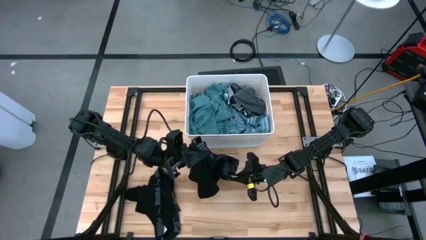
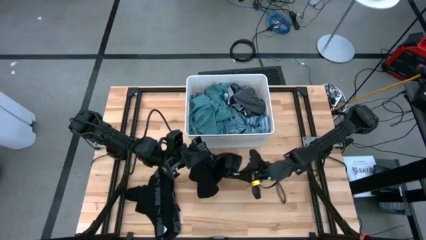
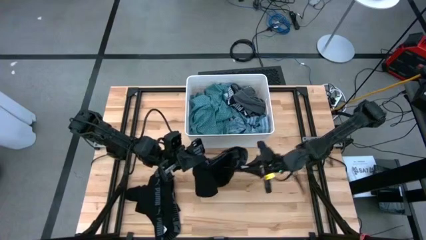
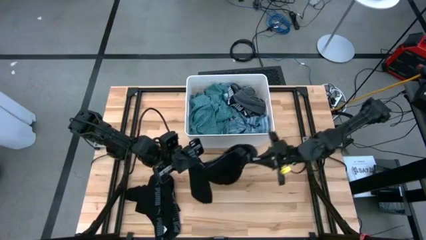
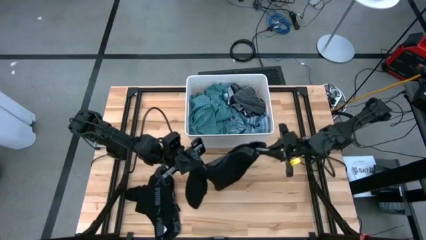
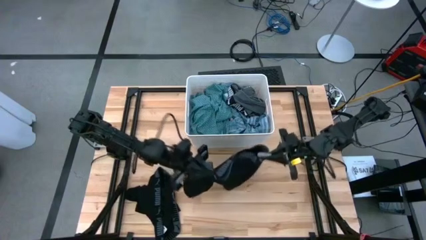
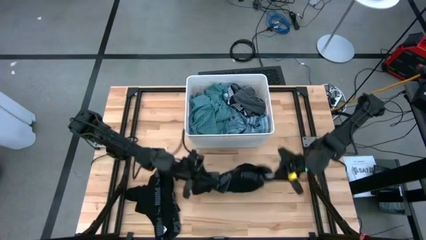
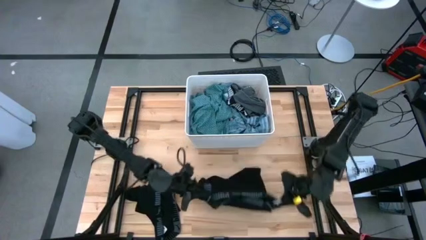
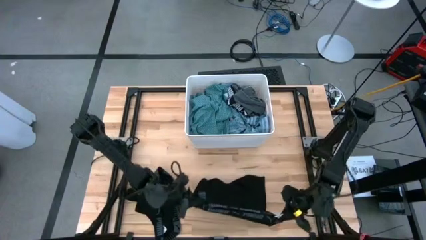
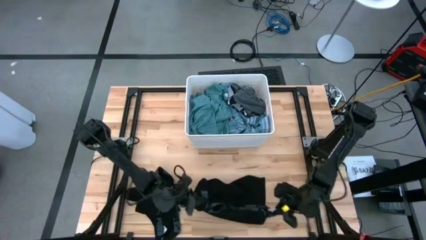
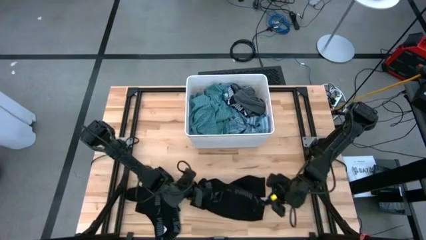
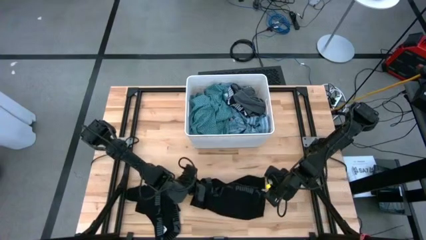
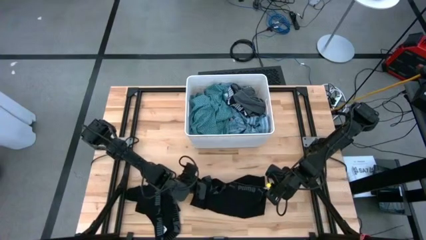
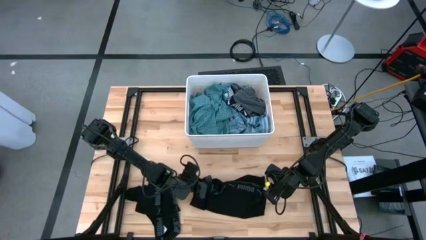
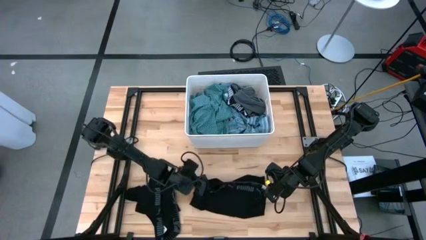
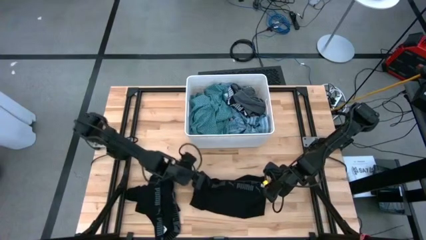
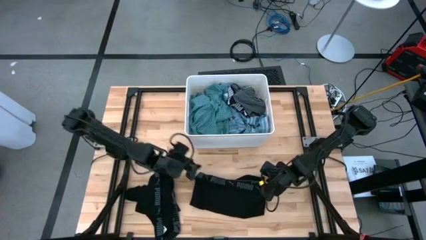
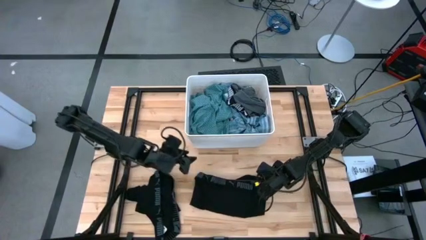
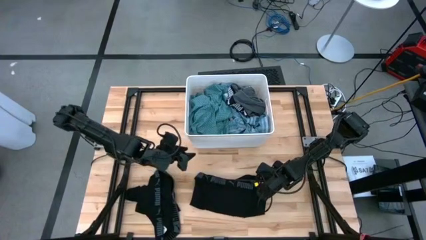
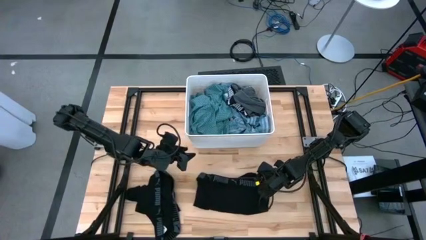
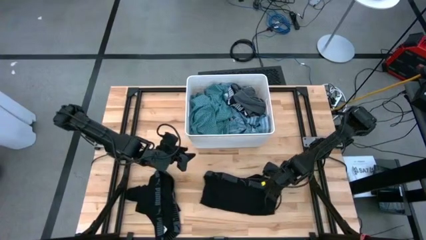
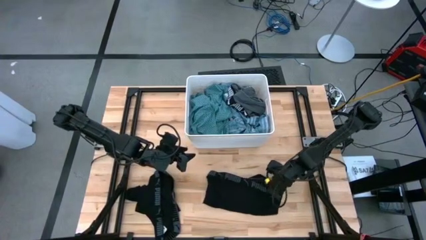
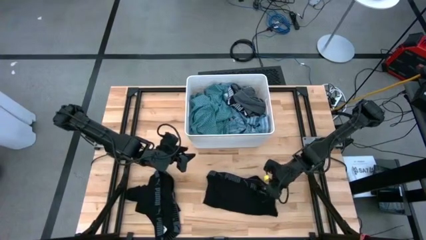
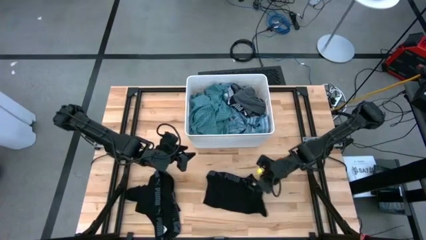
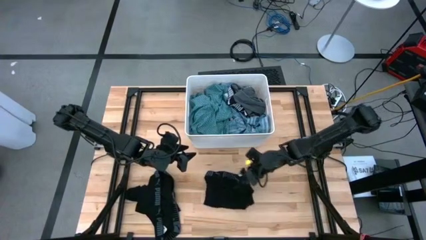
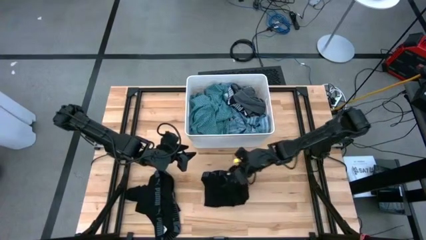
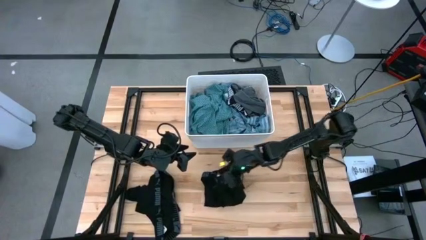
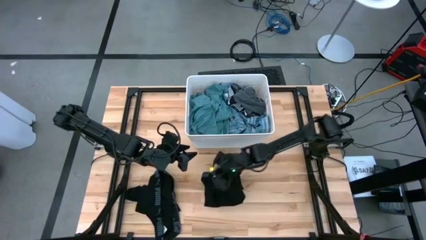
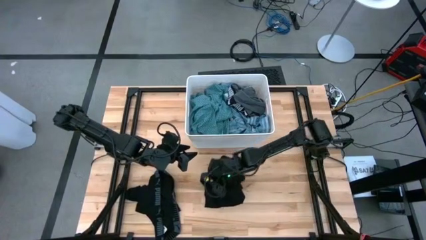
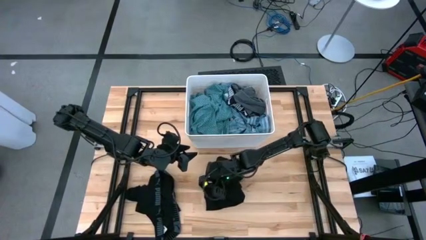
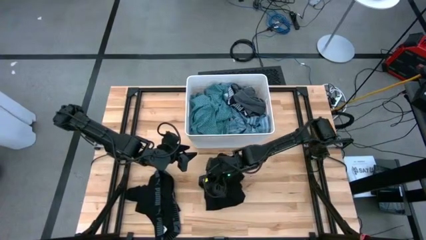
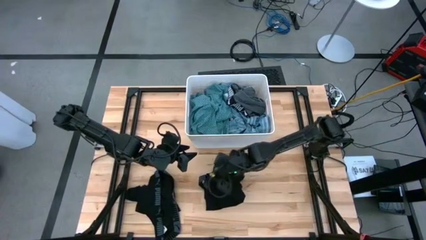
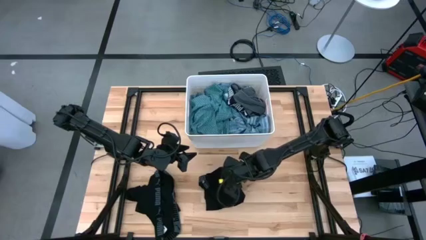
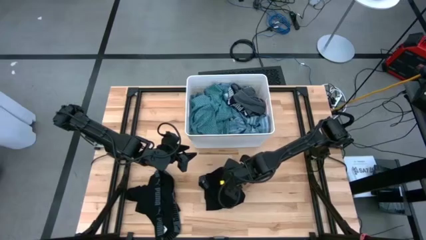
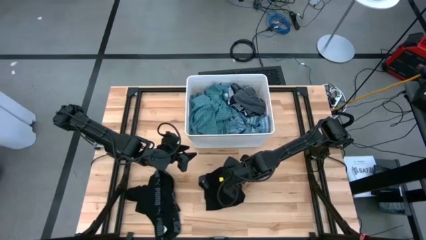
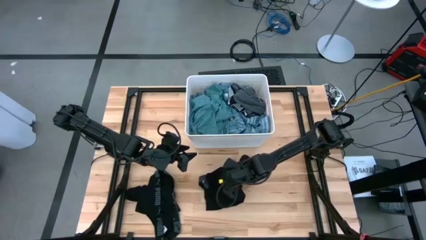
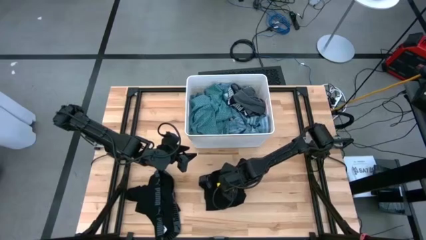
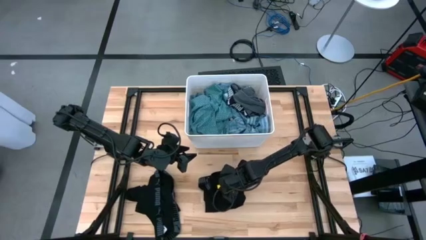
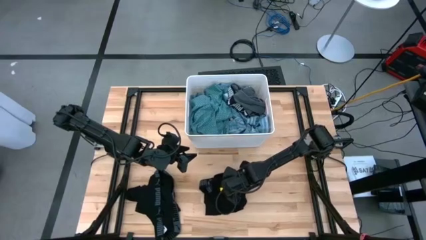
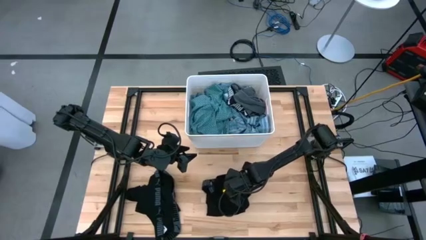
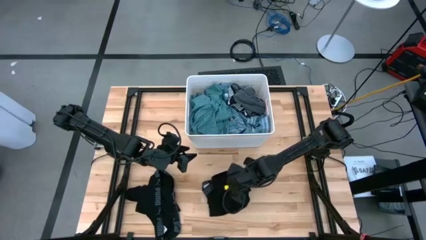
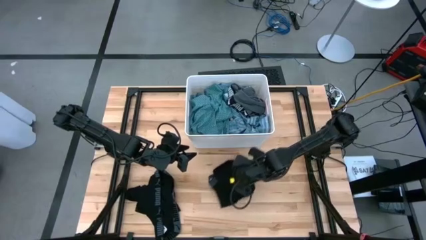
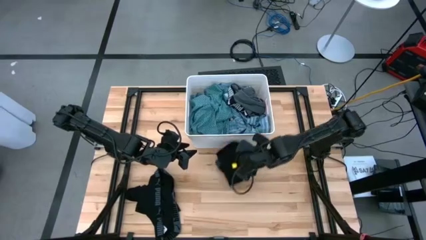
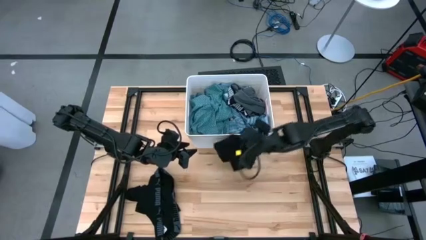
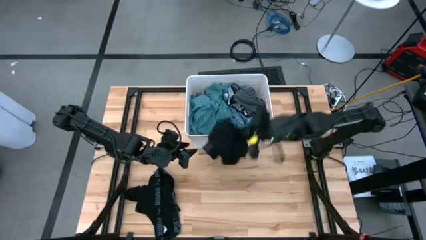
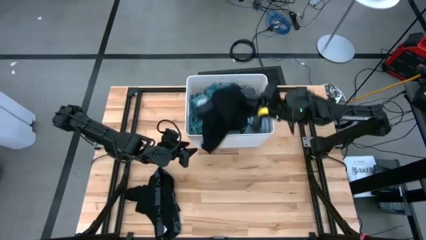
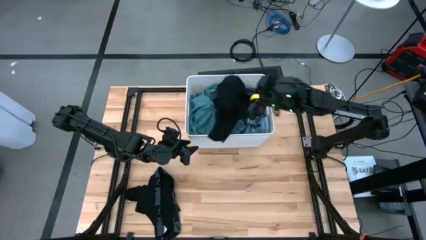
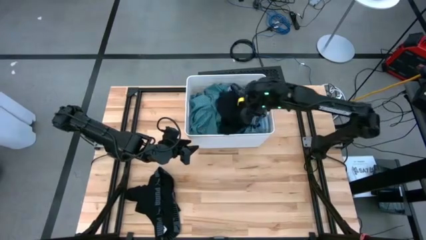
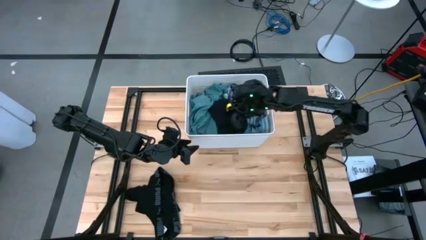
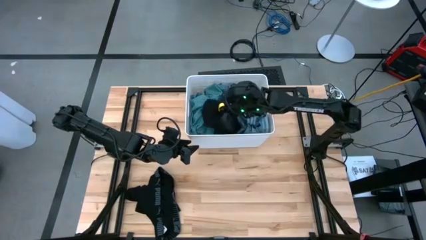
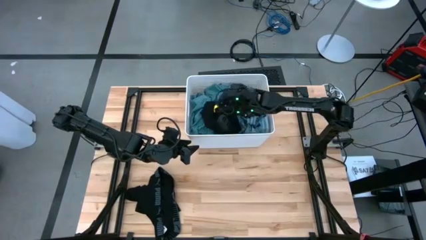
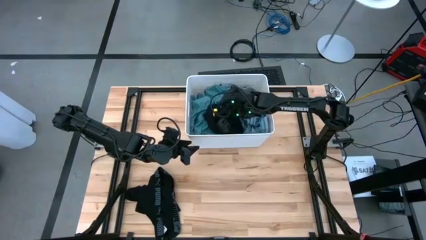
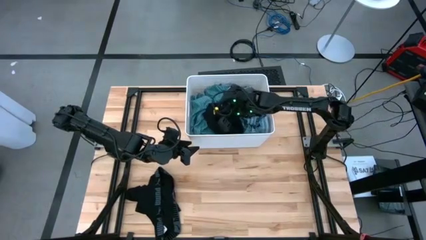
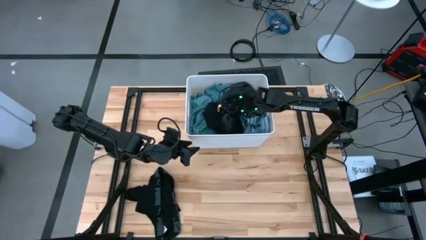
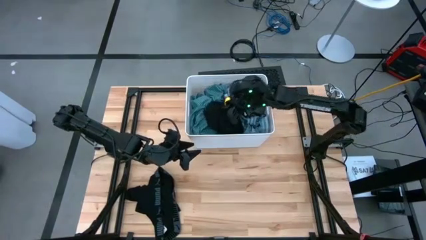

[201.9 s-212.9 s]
Task: Sort clothes
Put the black underwear into the white laundry organizer

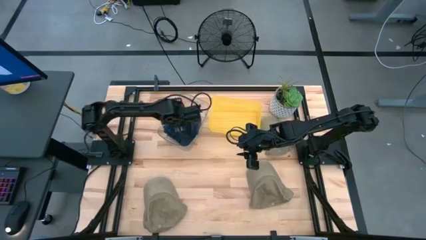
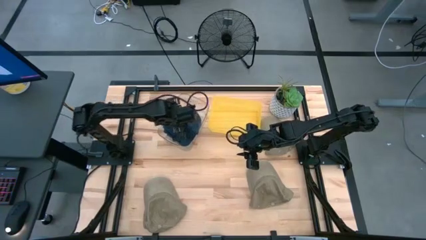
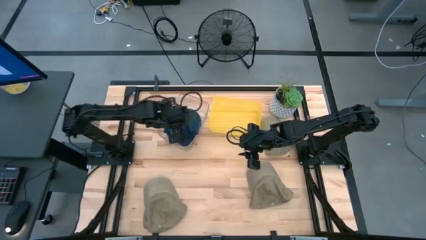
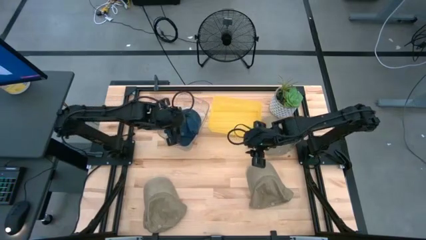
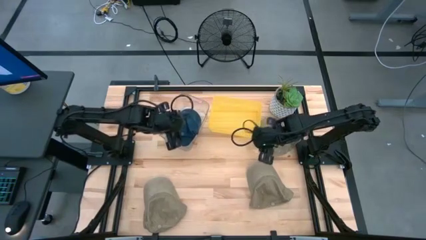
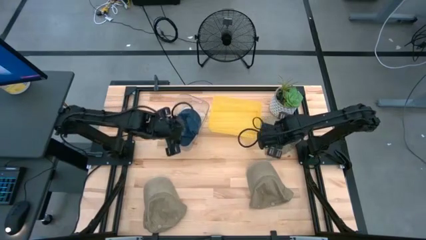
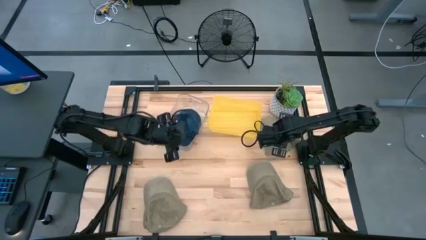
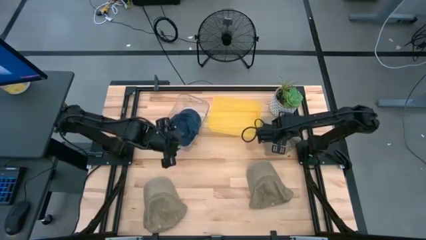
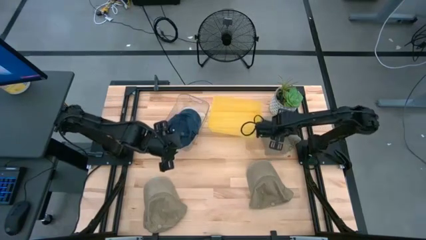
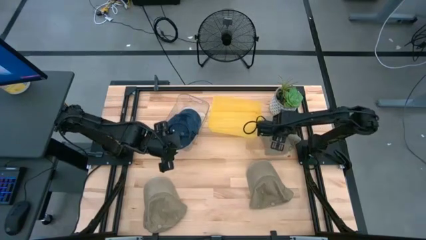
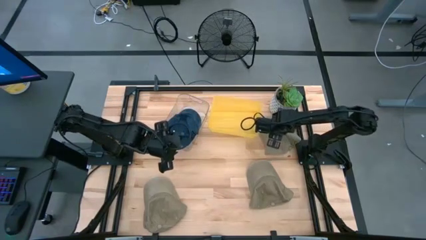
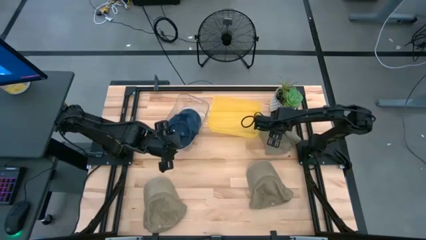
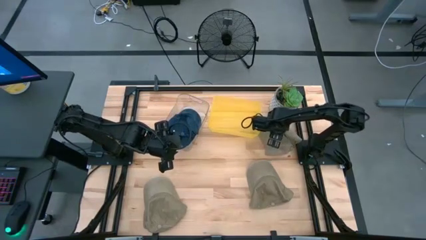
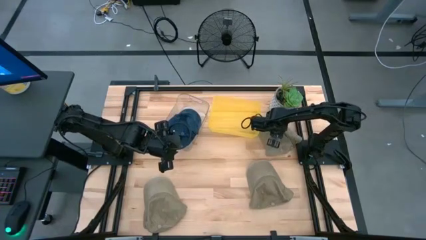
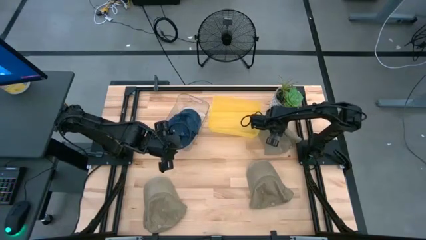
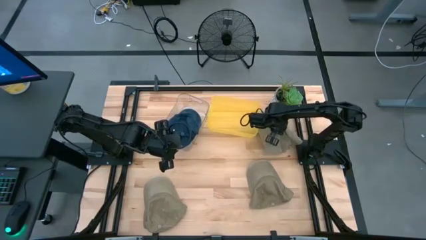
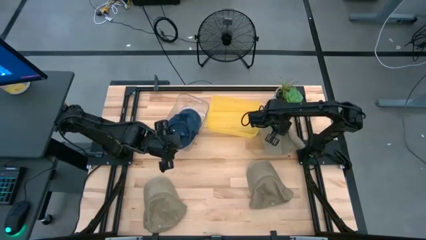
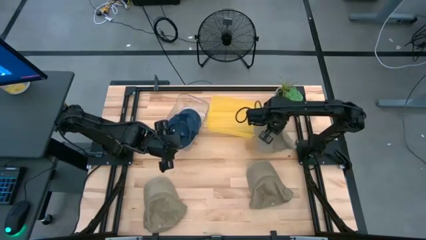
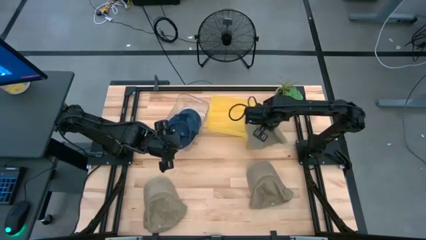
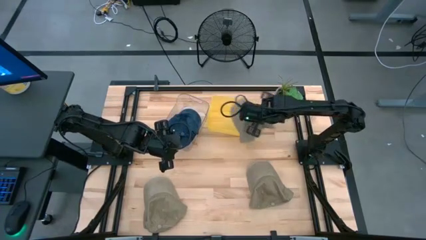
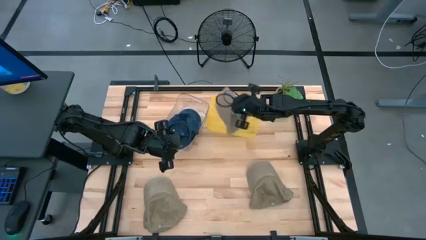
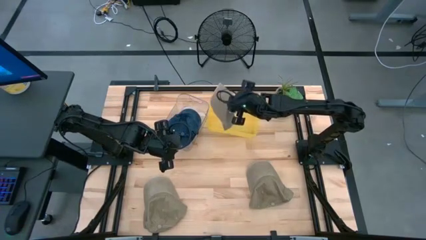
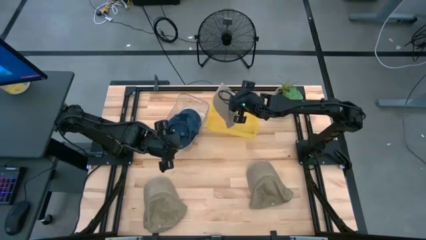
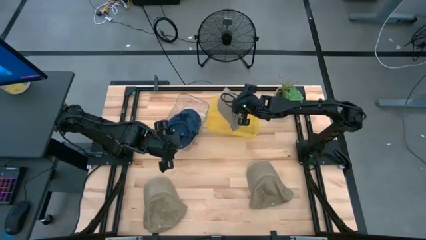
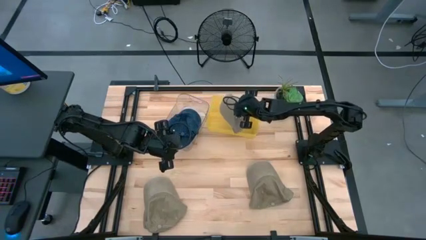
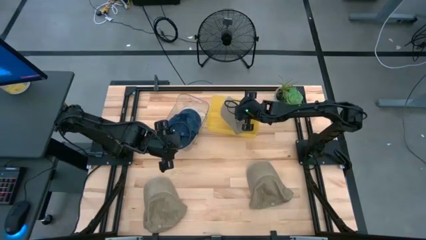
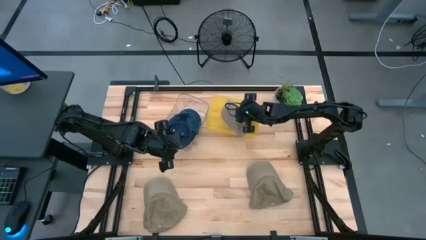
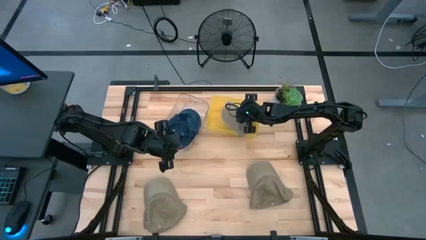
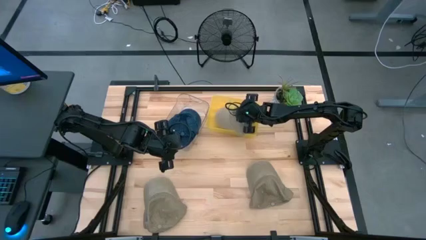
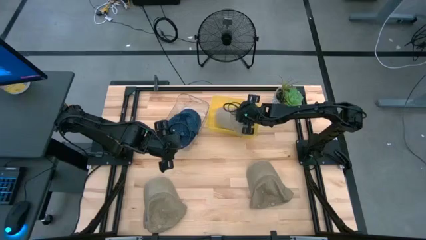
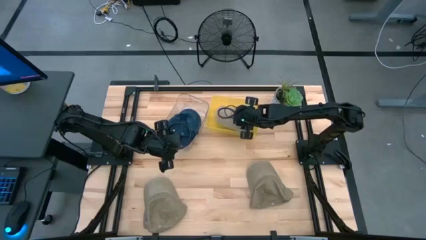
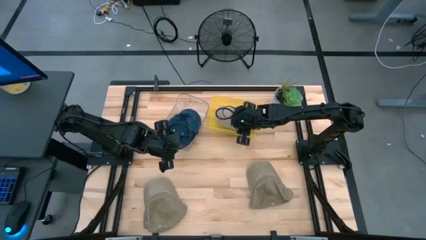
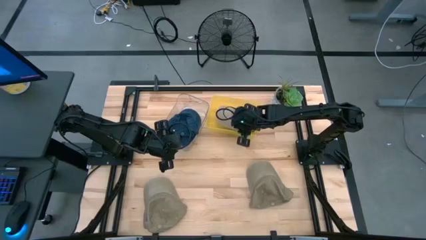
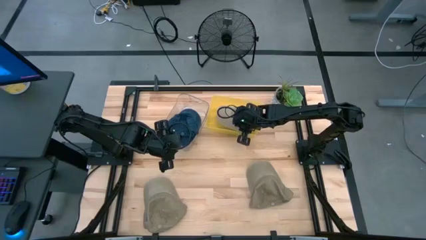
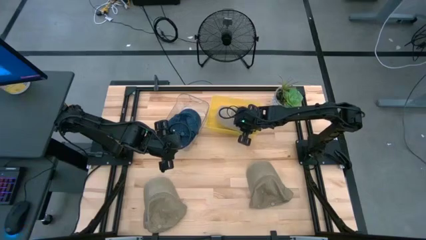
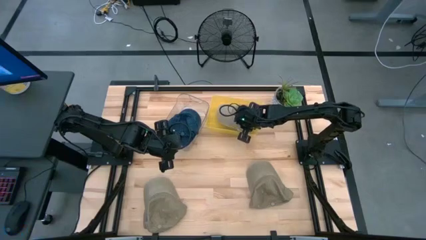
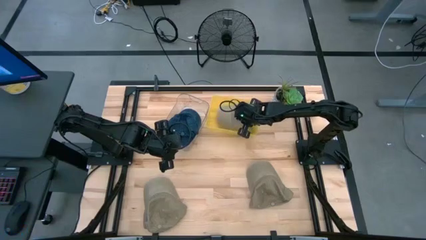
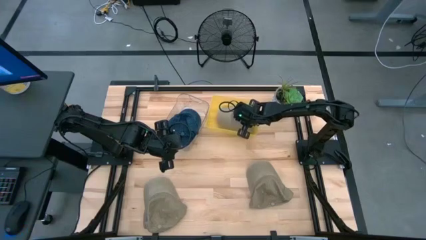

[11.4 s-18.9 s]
Task: Pick & Place hat
Put the top right brown cap into the yellow bin
